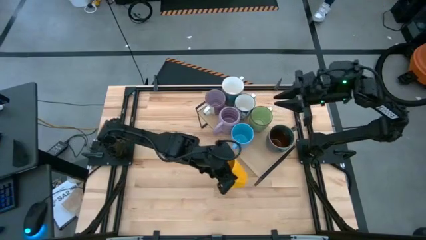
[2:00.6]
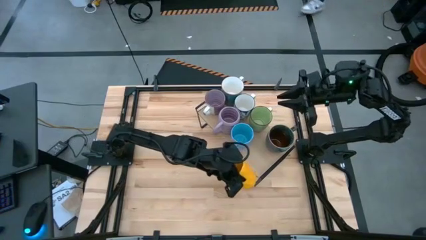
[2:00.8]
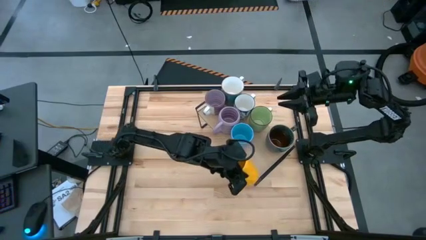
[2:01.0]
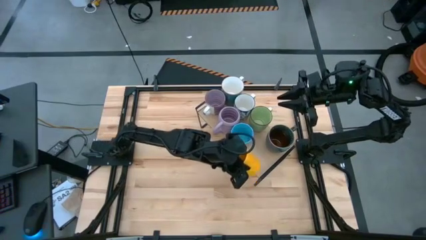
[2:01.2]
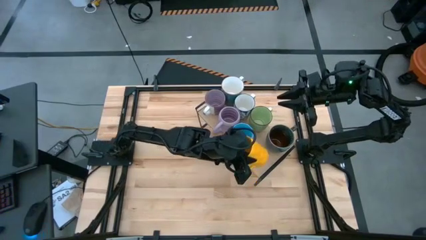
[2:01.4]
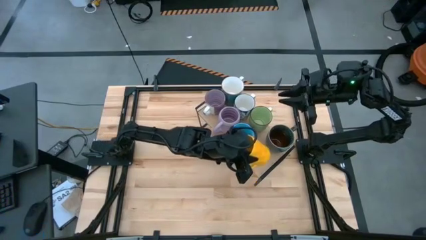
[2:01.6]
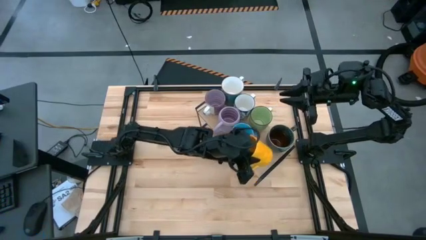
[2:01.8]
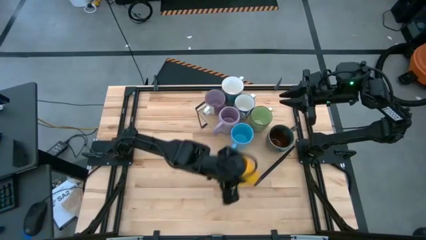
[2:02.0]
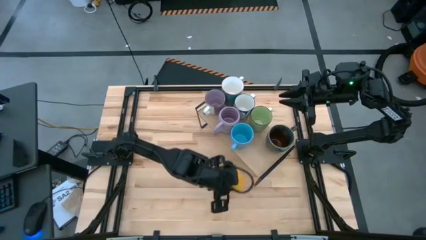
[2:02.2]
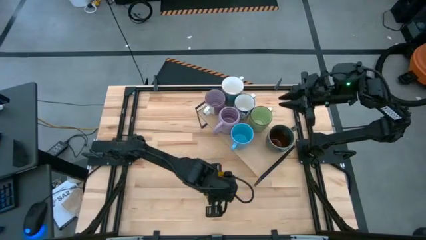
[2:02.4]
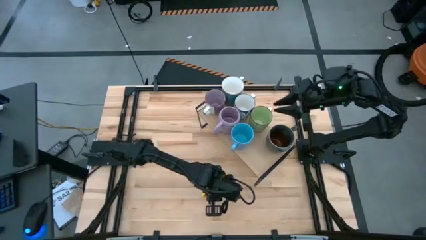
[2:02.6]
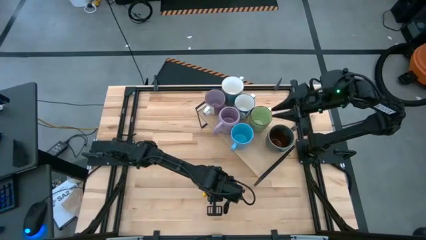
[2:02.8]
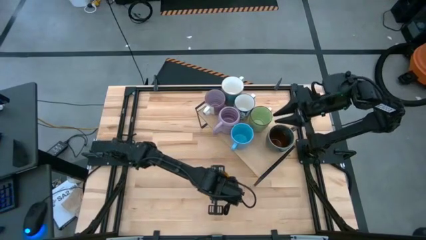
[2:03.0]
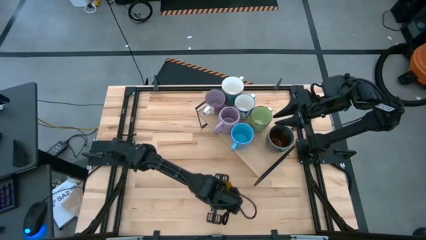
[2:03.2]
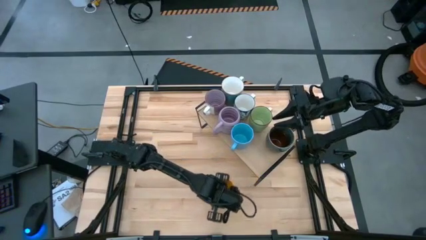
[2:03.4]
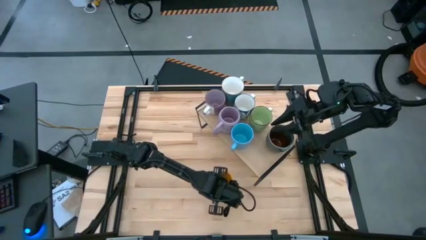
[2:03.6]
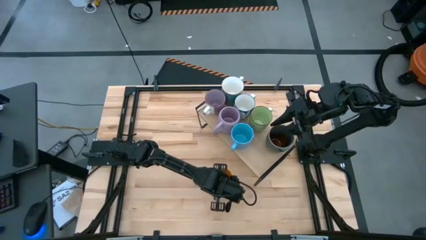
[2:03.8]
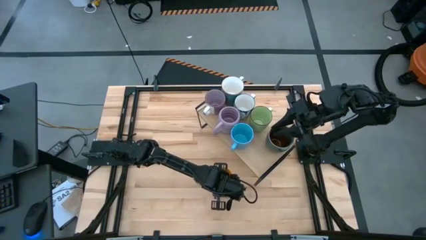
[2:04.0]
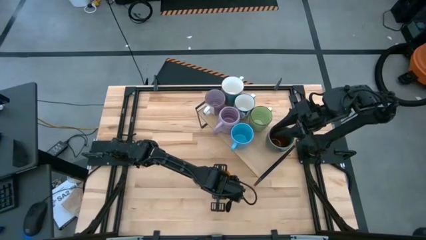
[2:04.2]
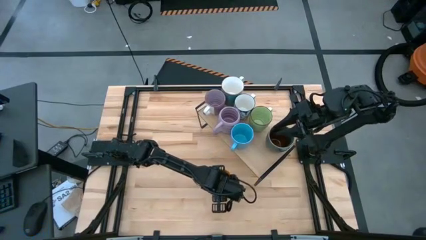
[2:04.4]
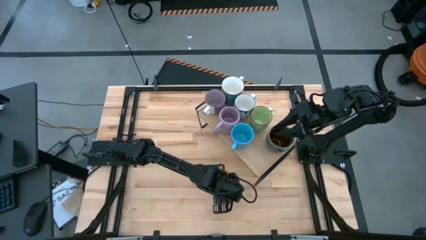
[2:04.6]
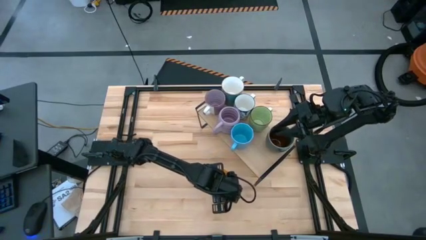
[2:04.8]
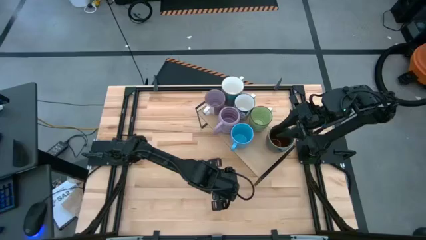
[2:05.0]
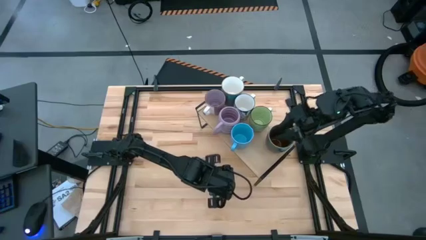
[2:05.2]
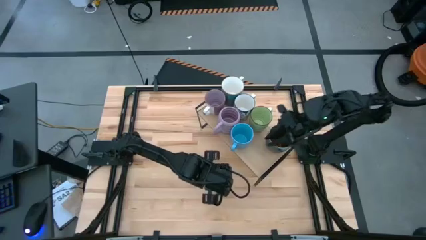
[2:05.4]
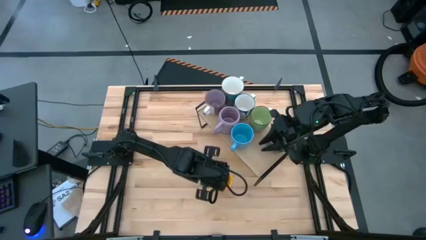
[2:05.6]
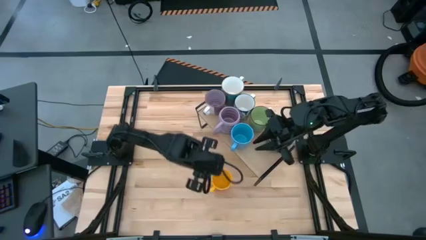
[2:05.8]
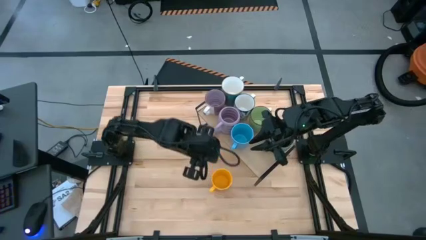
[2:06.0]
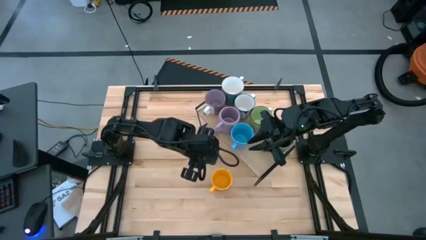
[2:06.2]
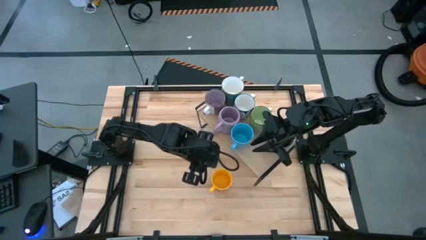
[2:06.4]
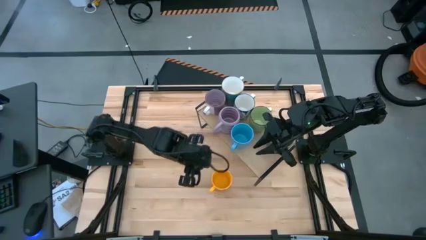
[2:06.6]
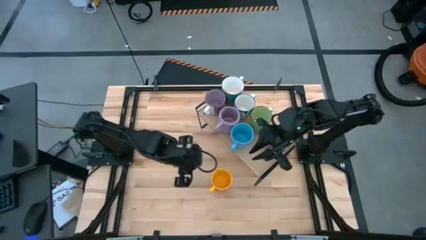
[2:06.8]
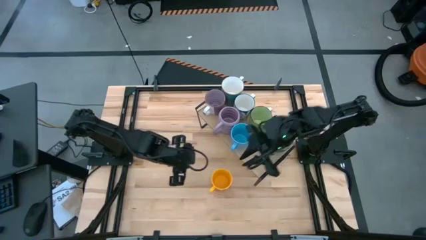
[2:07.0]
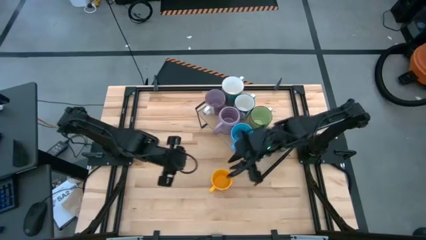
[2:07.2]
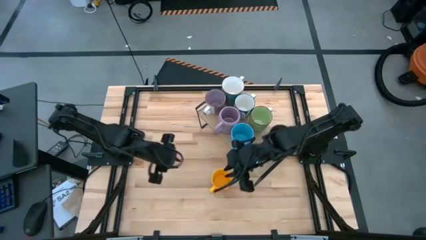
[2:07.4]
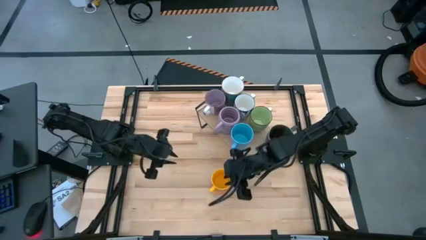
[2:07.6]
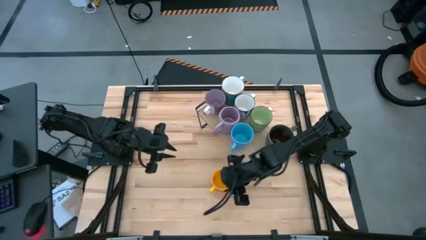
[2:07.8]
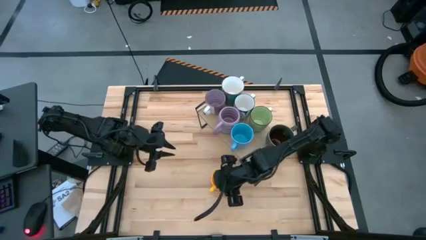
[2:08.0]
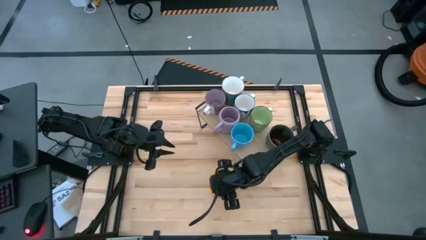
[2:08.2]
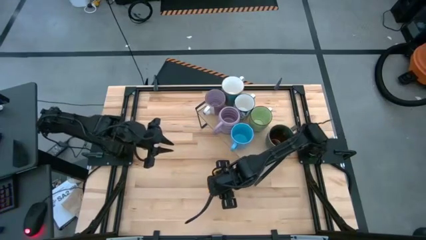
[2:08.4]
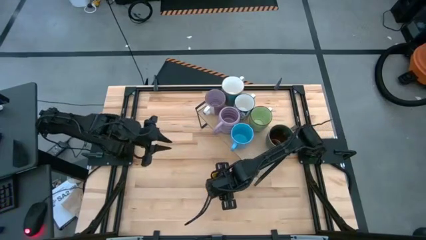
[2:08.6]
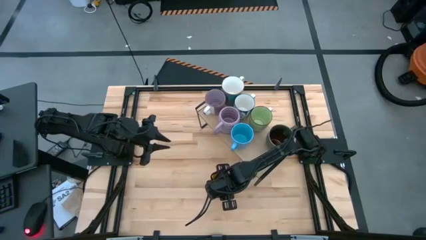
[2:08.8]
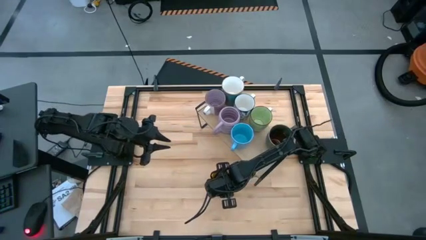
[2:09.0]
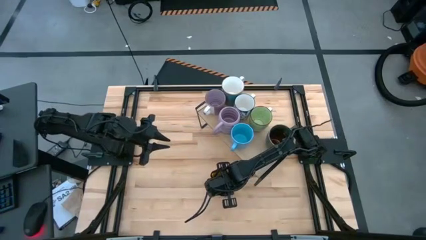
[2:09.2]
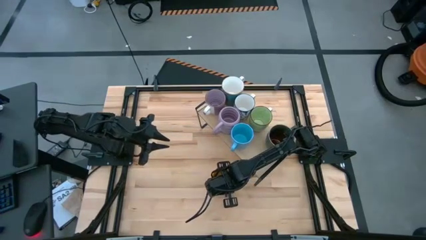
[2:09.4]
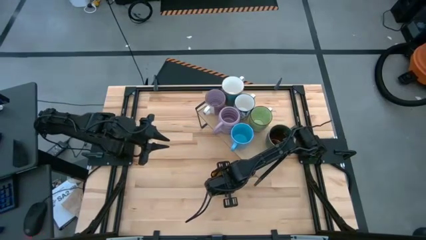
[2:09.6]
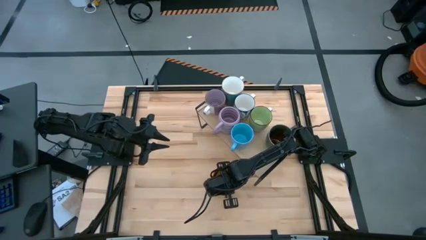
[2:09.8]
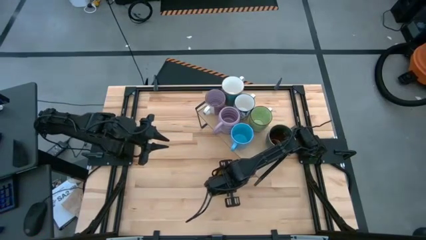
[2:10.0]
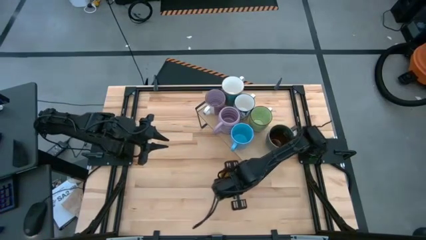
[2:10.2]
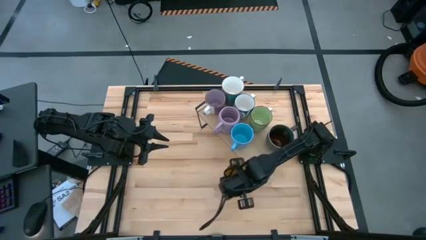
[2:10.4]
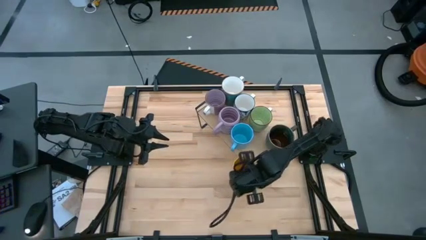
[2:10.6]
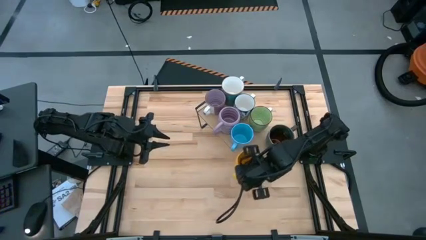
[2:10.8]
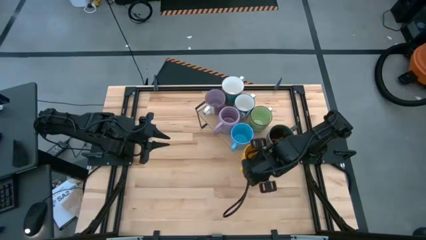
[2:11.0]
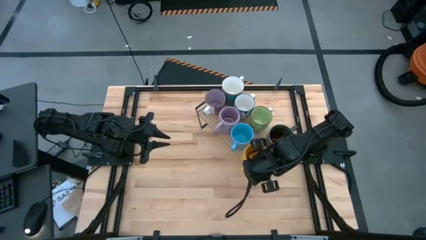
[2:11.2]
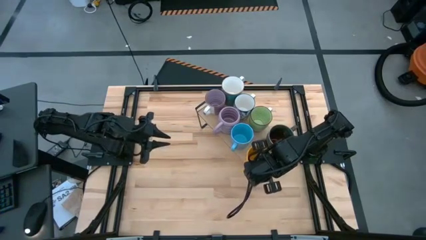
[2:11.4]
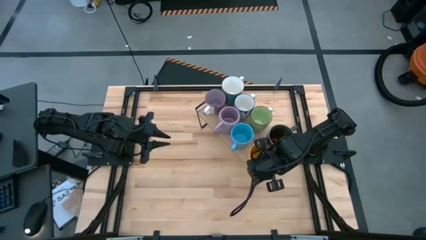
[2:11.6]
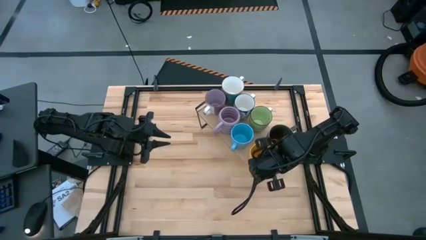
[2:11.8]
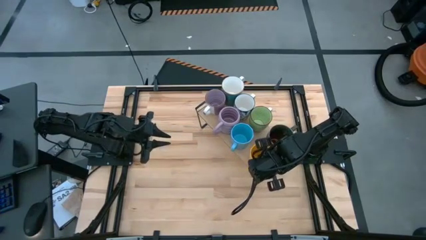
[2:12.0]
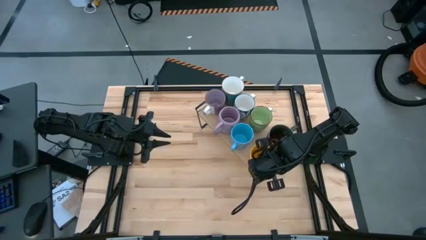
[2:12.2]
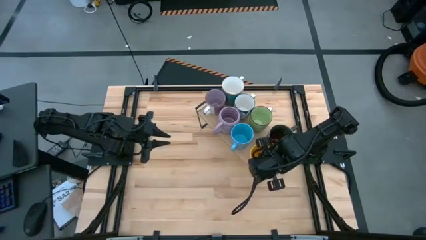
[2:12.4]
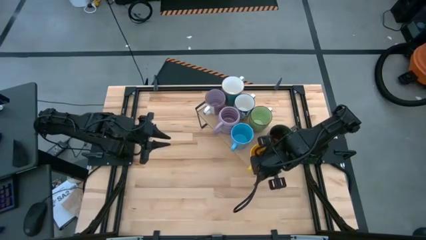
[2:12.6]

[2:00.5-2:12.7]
Task: Place coffee mugs
Put the yellow mug on the shelf

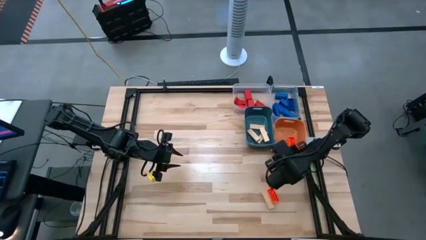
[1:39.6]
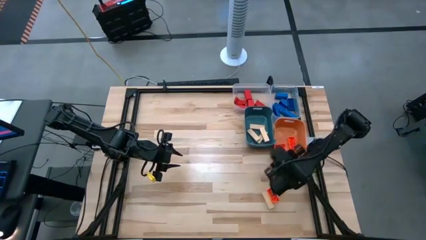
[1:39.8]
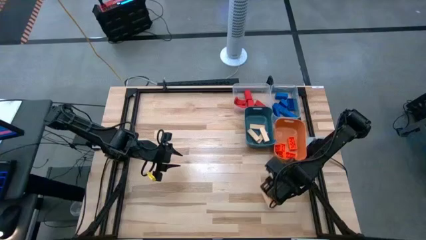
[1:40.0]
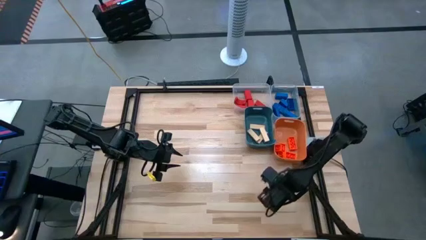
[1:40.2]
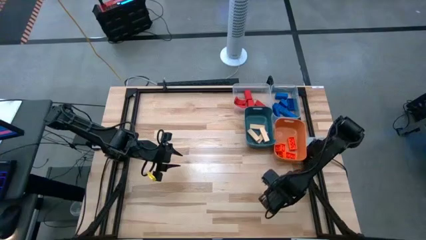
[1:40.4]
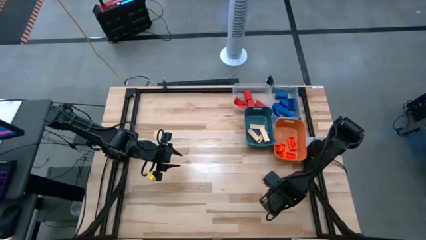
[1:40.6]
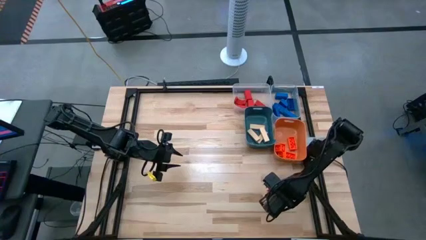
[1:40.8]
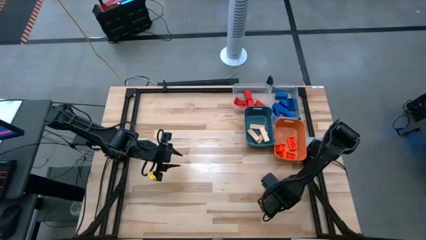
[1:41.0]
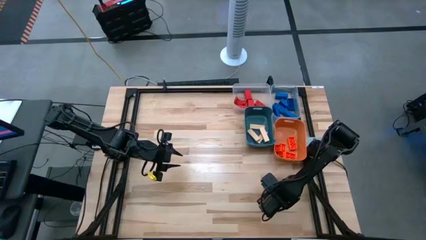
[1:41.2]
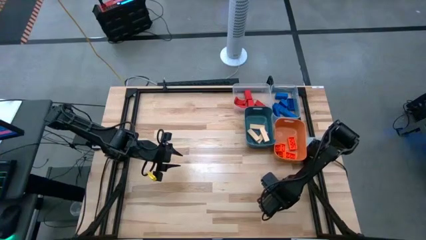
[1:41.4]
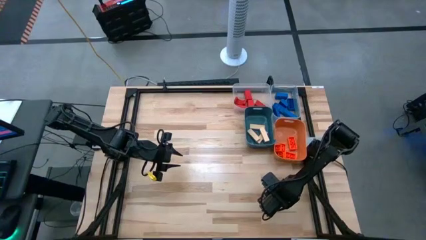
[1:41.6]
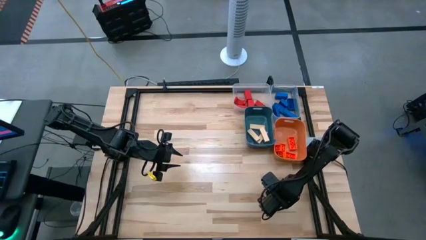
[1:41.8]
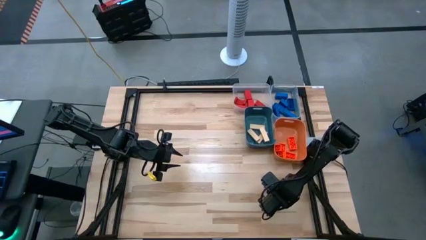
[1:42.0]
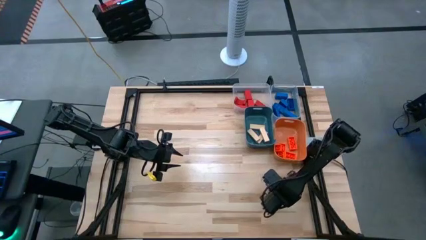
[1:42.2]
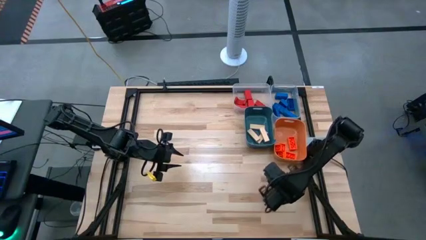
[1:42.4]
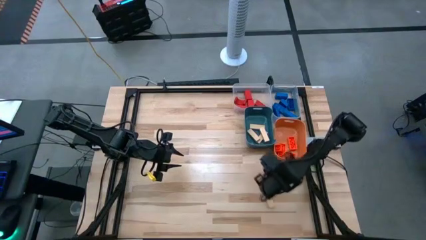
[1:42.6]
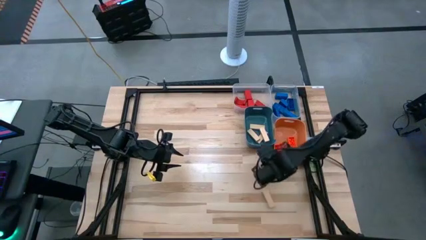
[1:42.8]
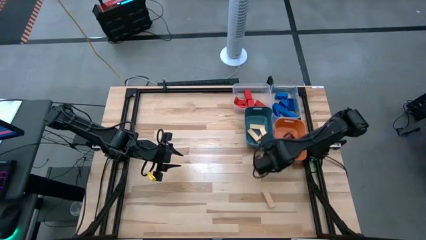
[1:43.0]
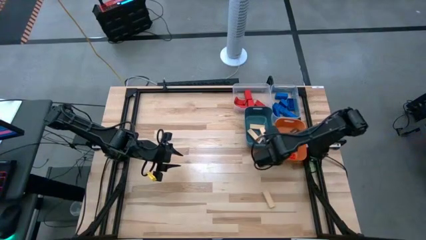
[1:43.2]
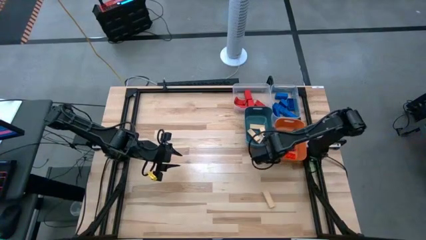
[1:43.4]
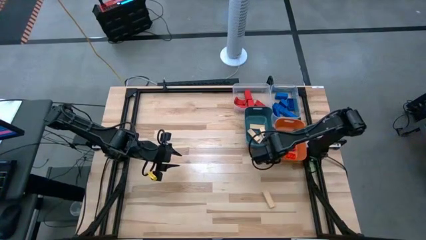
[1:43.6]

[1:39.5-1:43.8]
Task: Sort blocks
Put the 8 stud orange game piece into the orange bin
